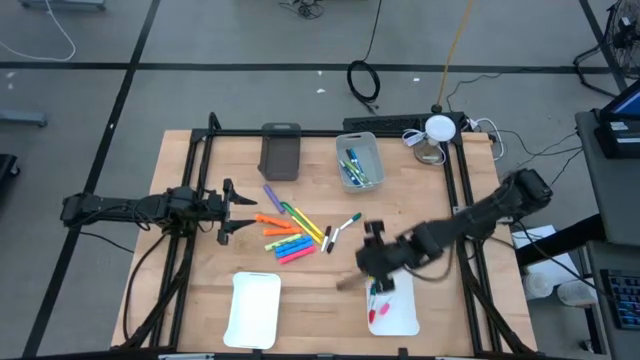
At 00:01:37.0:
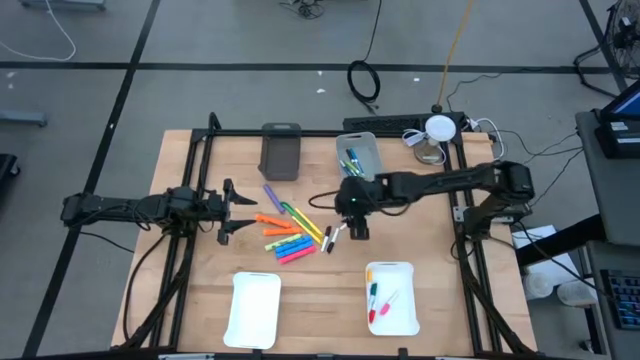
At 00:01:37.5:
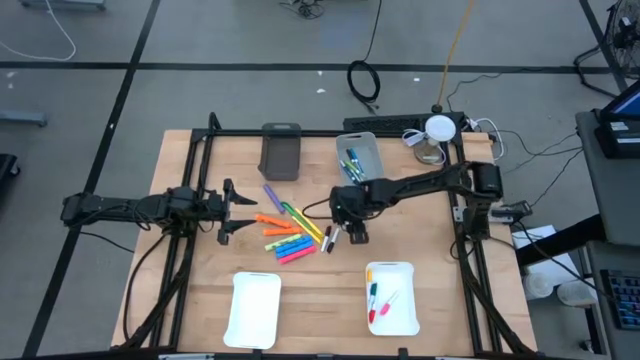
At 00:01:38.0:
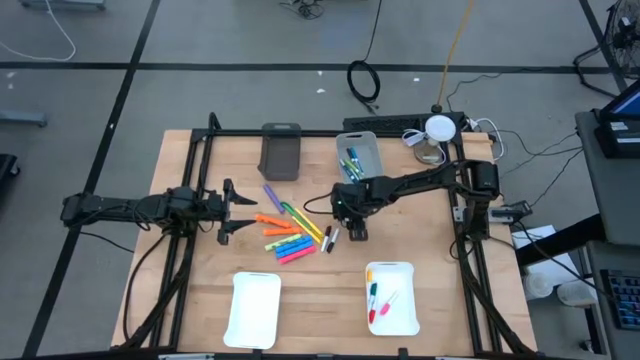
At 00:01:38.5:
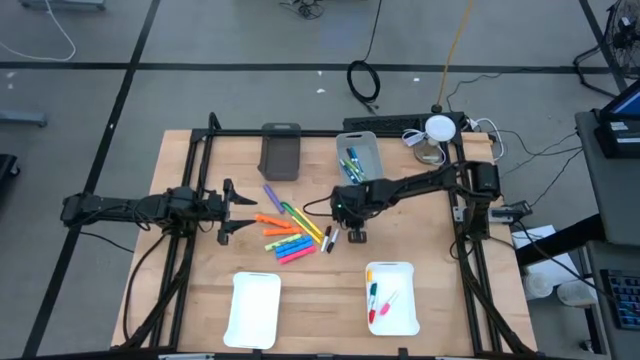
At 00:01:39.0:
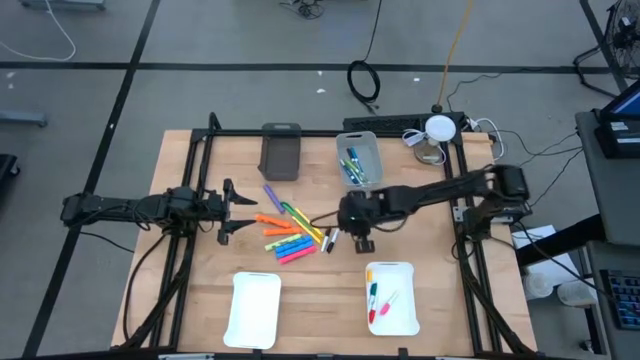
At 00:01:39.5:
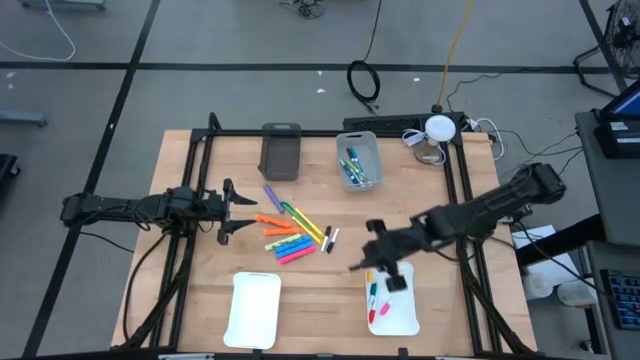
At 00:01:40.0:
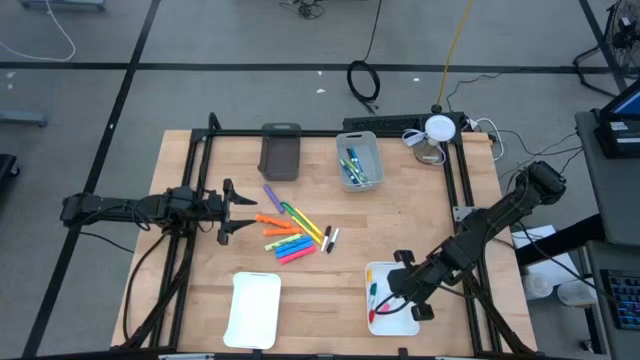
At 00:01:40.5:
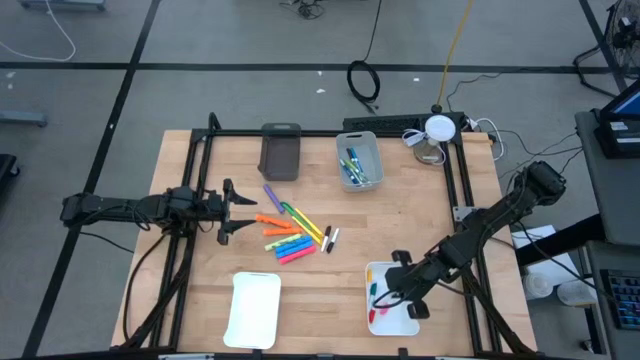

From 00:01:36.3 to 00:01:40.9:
Task: Pick & Place Markers
Put the green highlighter pen into the right white bin

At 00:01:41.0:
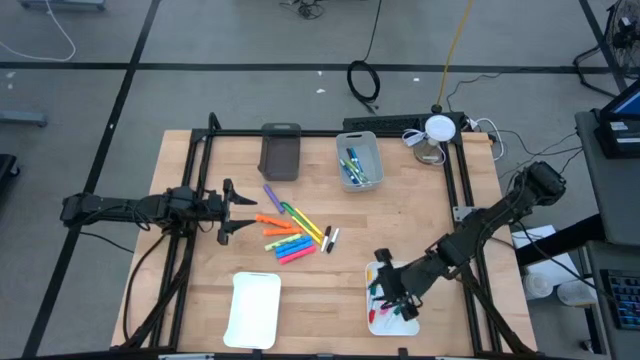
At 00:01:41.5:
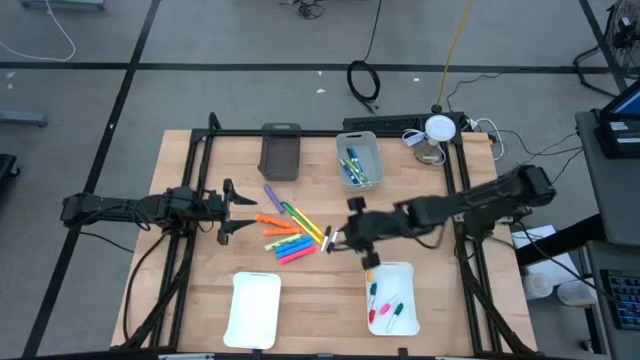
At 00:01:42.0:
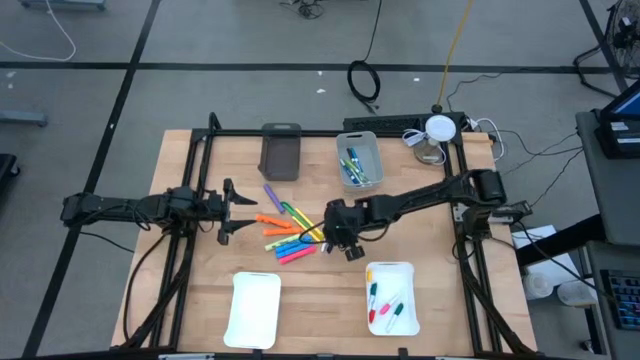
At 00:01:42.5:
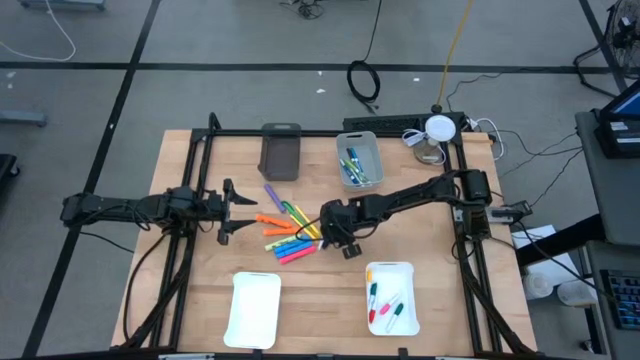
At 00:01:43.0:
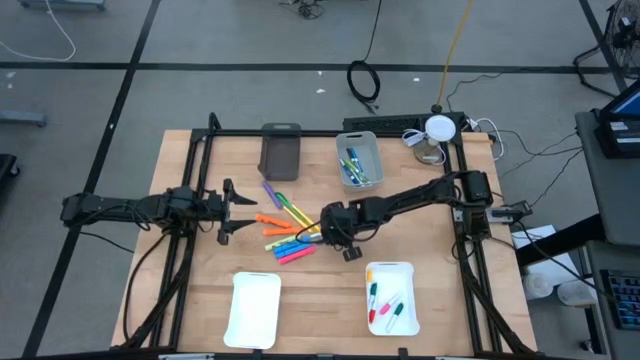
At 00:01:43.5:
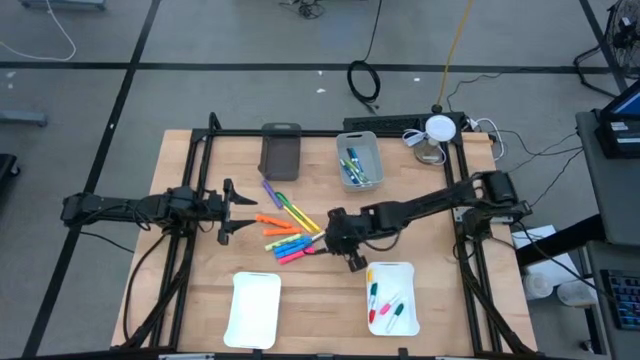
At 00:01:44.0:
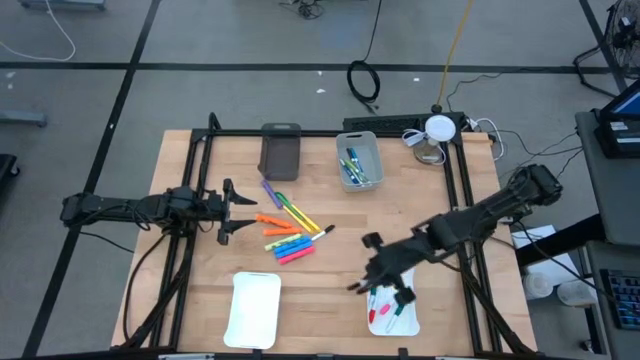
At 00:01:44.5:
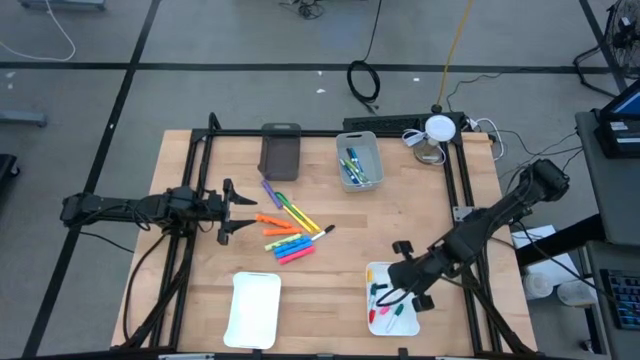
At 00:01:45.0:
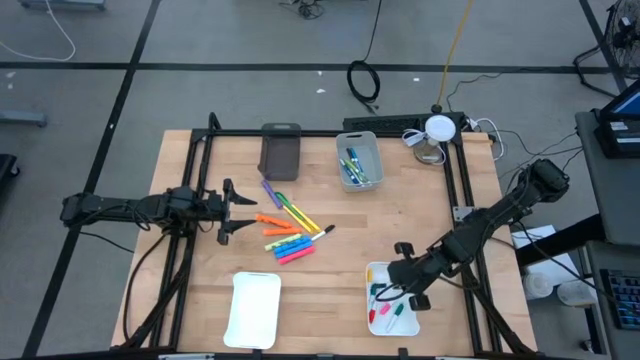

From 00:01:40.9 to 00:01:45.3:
Put the right black highlighter pen into the right white bin

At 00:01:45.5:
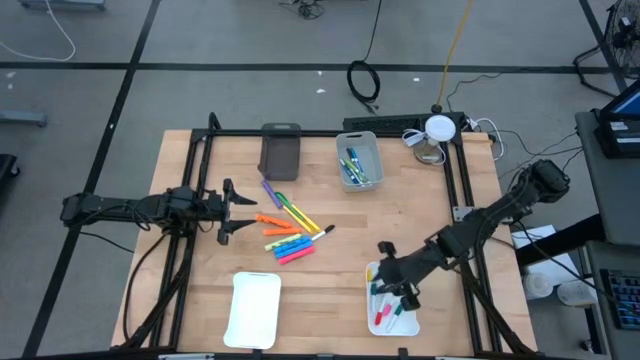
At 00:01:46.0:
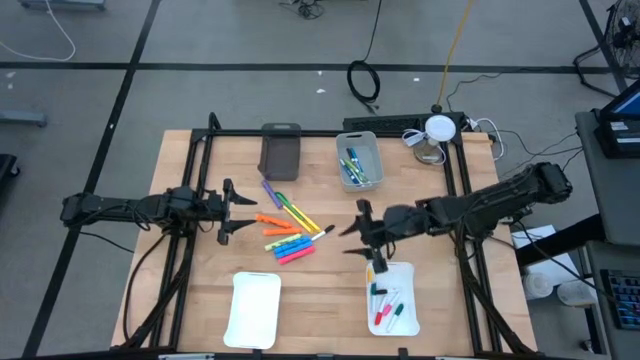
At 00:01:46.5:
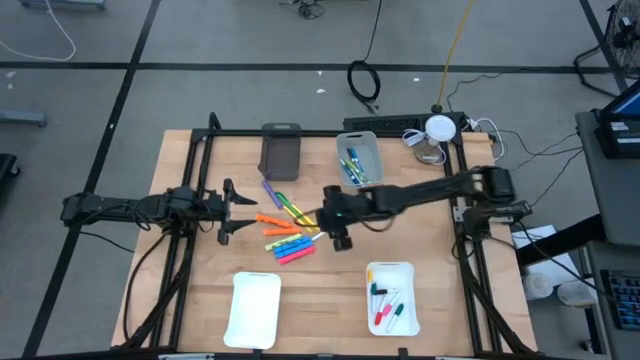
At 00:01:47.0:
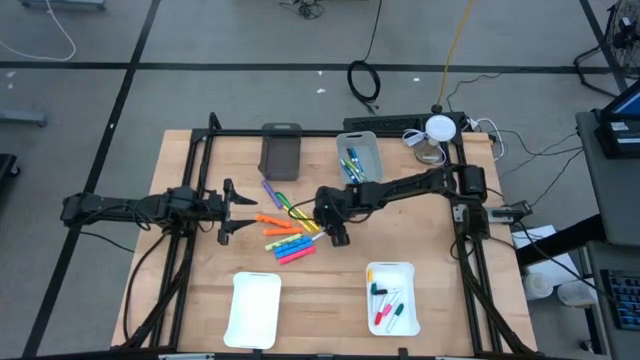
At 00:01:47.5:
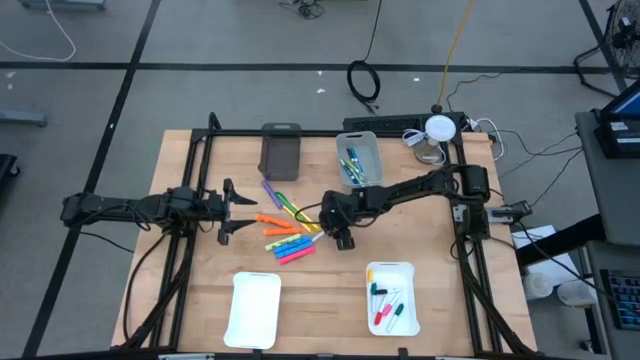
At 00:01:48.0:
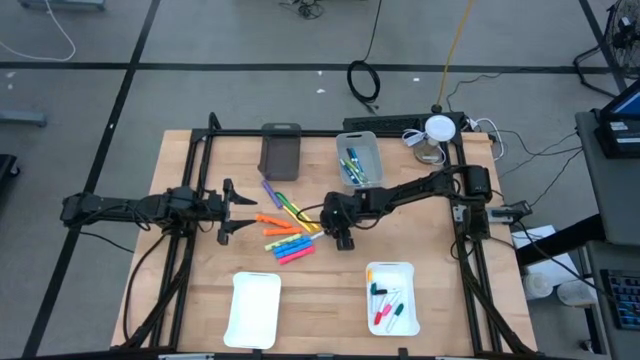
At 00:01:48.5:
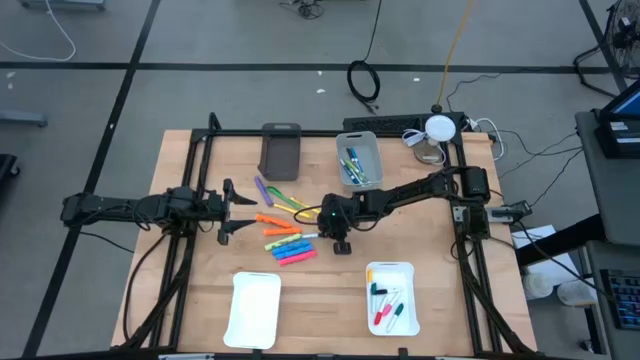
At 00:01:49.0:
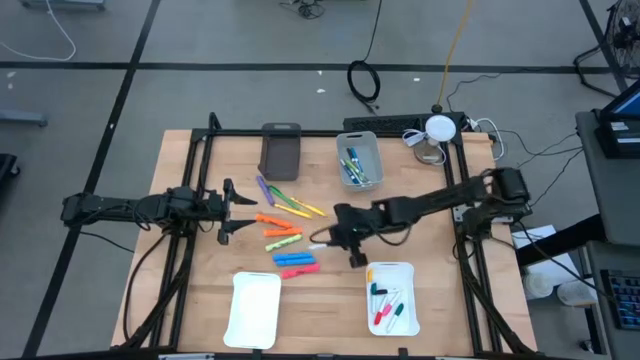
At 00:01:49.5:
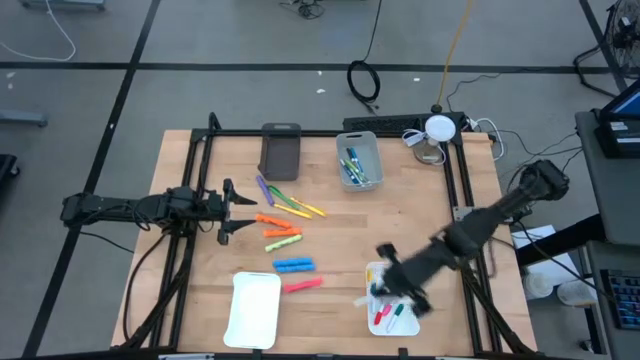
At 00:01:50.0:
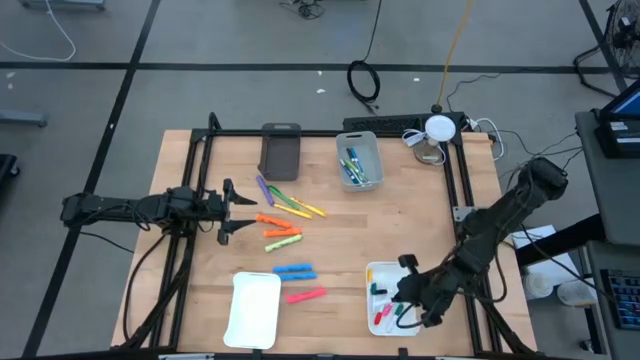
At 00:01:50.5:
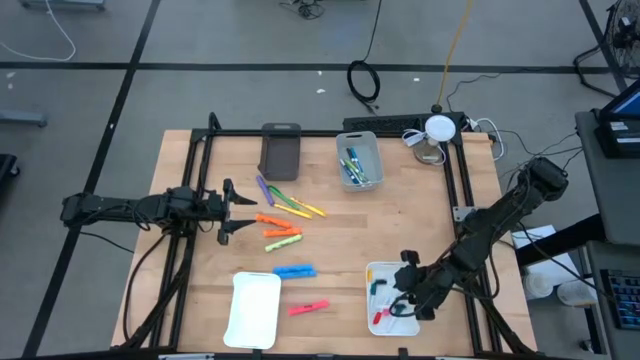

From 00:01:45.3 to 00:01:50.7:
Put the black highlighter pen into the right white bin

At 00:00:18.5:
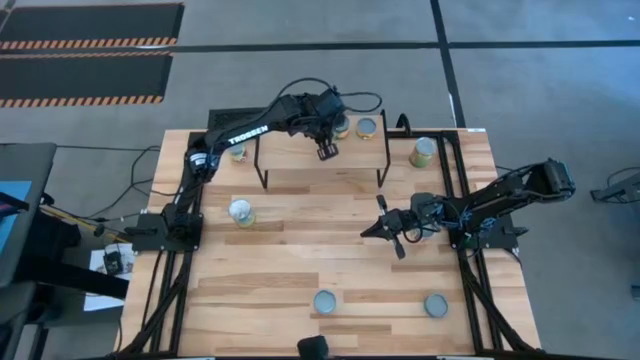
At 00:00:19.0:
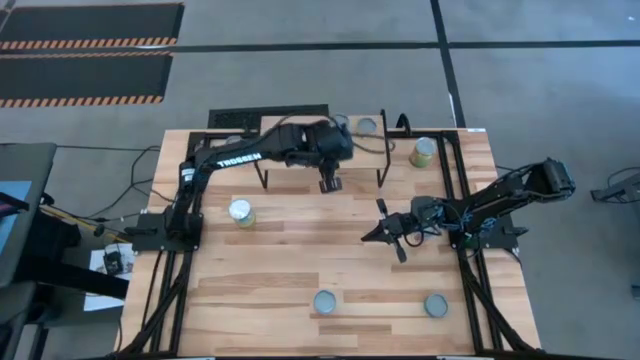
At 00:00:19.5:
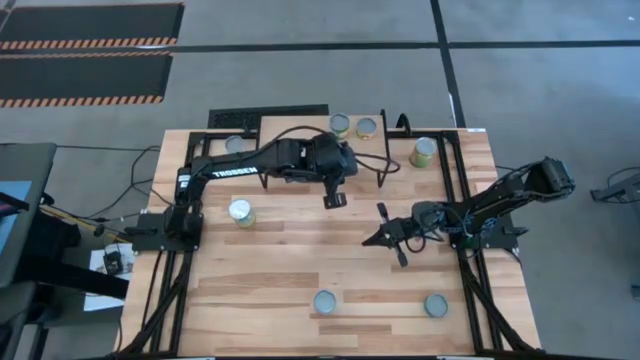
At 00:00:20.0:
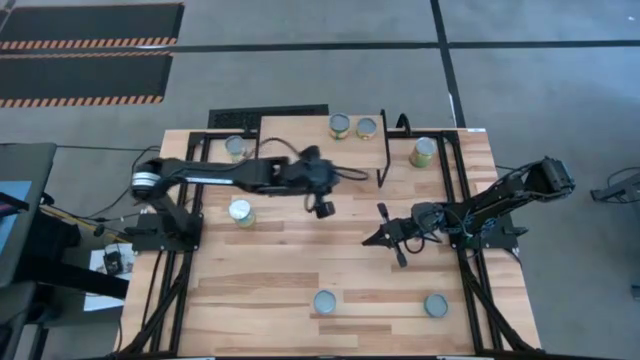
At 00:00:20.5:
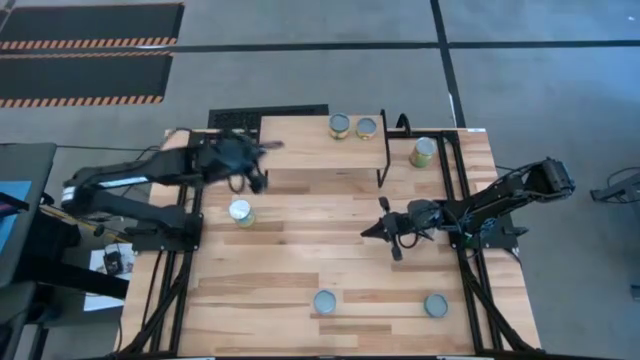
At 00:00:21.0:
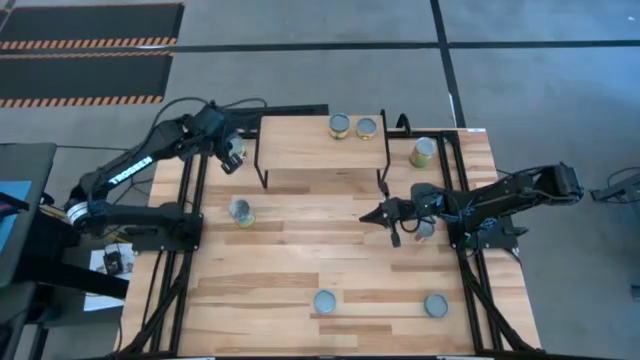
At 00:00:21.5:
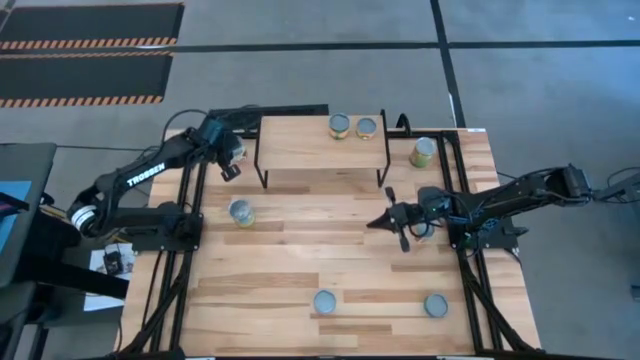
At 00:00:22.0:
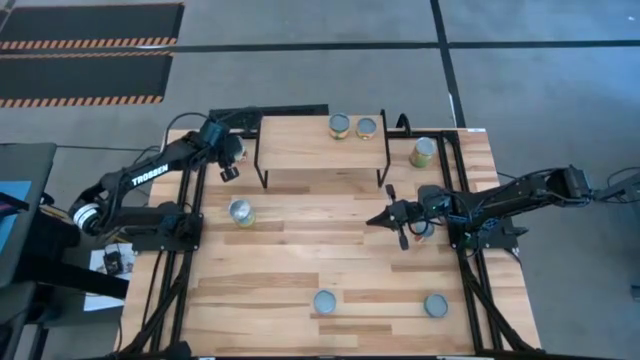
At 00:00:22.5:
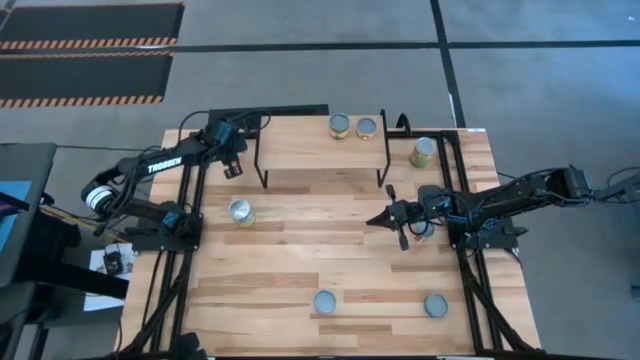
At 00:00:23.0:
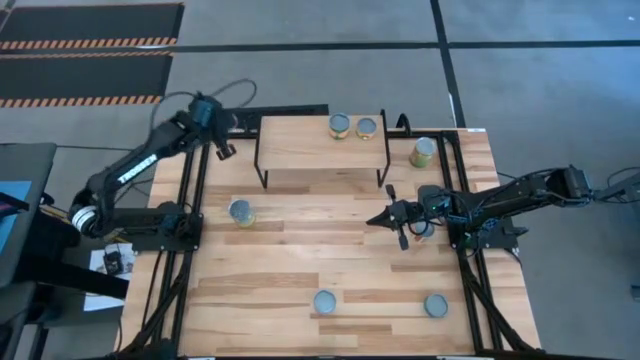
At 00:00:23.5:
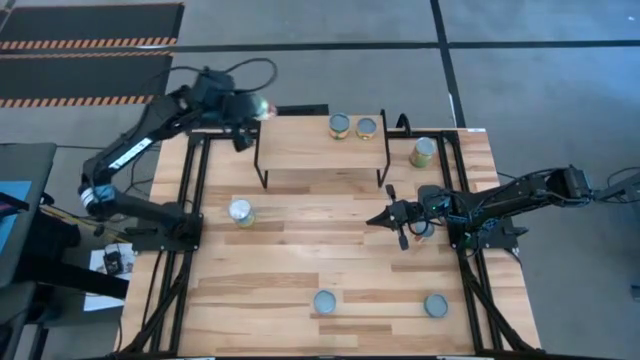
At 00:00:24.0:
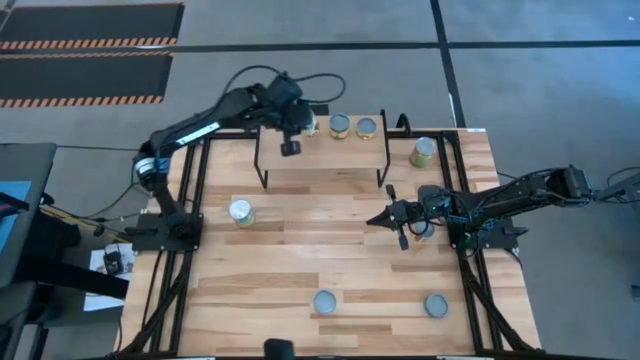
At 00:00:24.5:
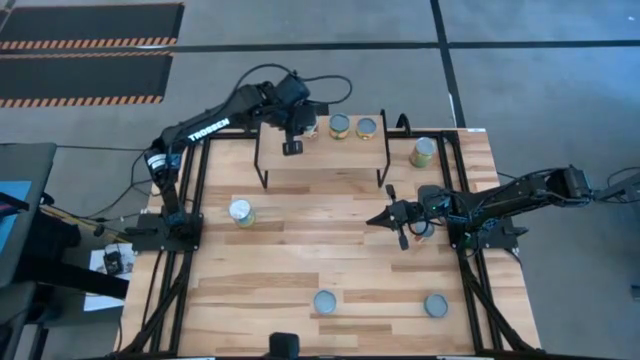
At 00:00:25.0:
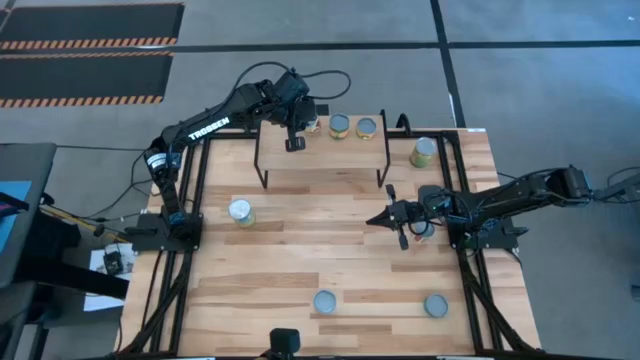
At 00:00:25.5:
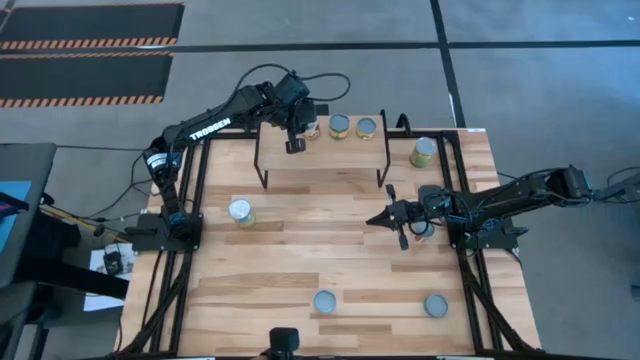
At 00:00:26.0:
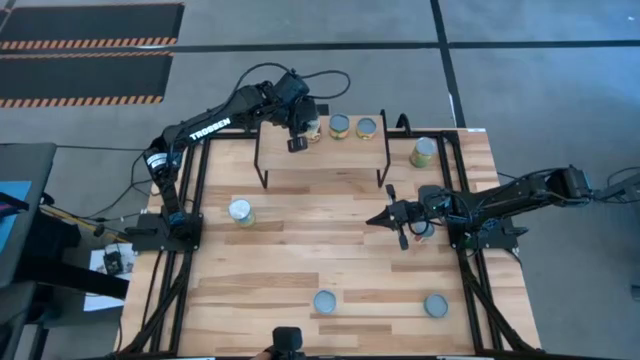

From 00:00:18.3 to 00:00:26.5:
Task: Pick and place cans onto a shelf
Put the canned spaghetti sauce on the shelf
